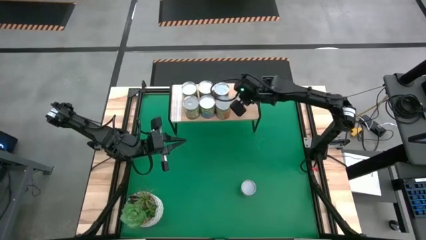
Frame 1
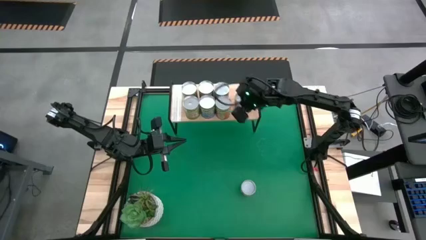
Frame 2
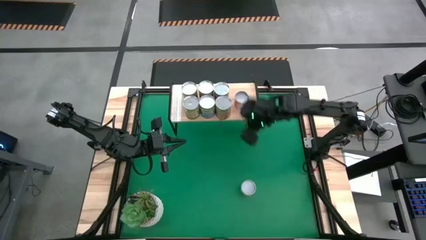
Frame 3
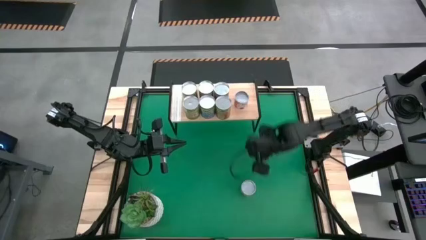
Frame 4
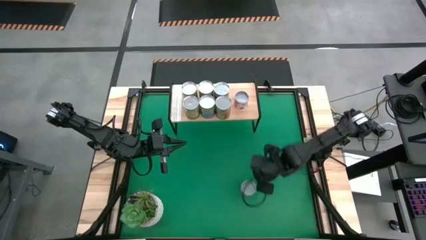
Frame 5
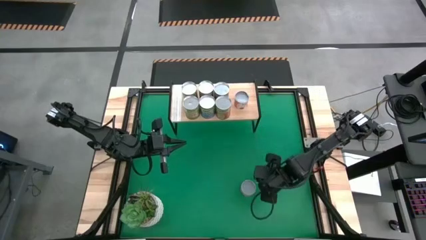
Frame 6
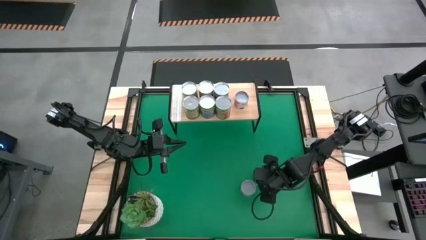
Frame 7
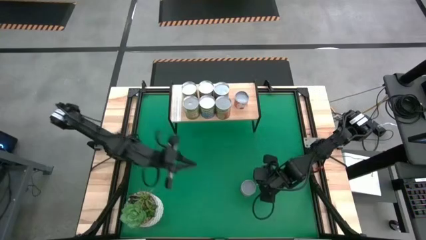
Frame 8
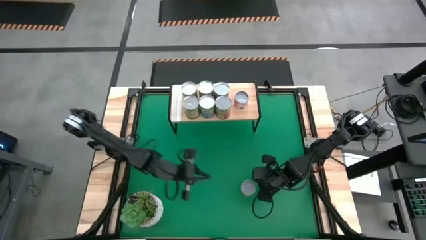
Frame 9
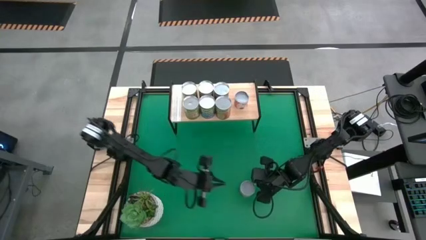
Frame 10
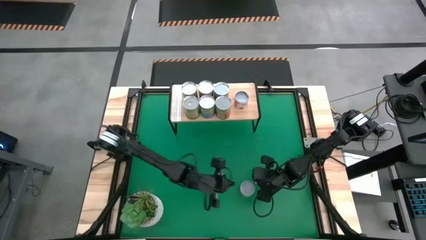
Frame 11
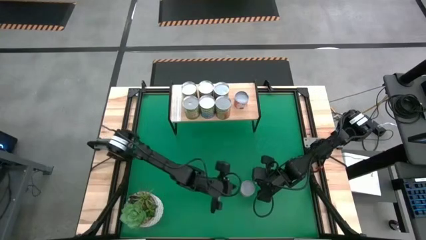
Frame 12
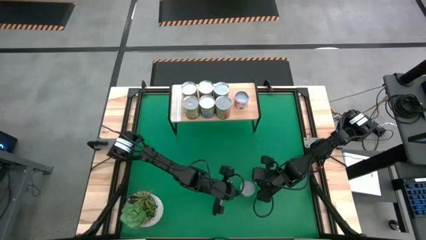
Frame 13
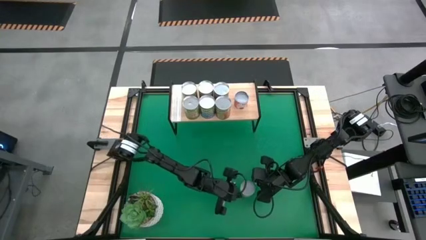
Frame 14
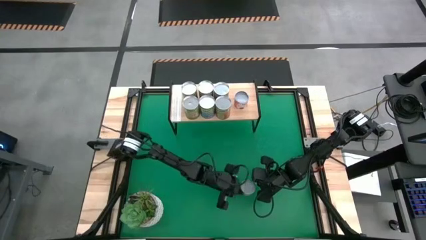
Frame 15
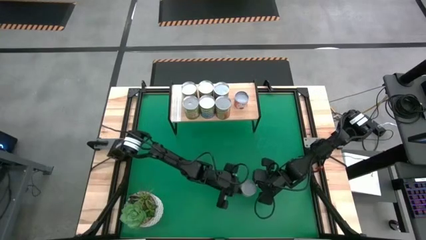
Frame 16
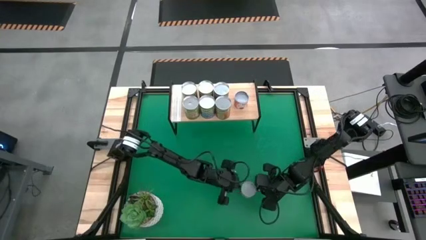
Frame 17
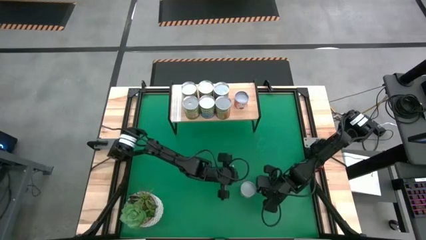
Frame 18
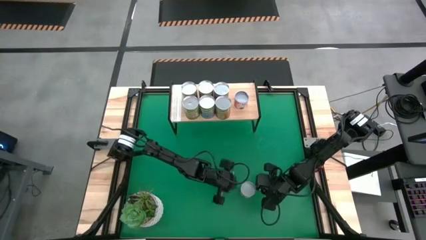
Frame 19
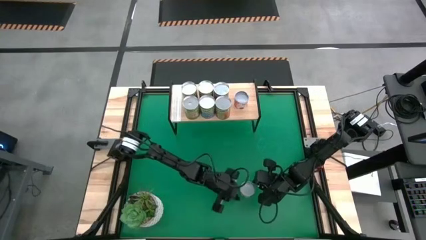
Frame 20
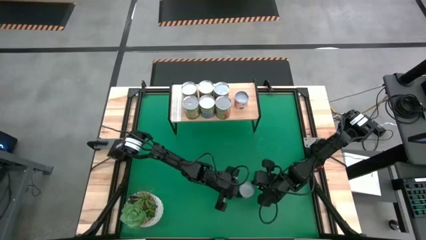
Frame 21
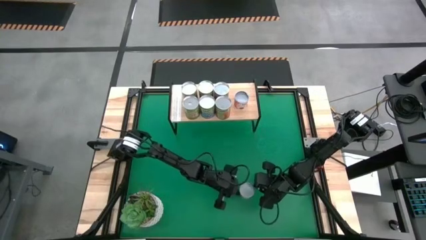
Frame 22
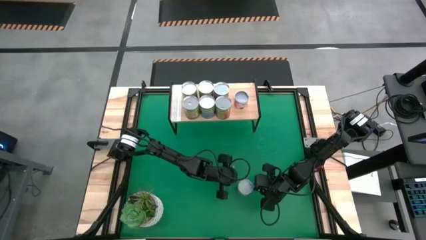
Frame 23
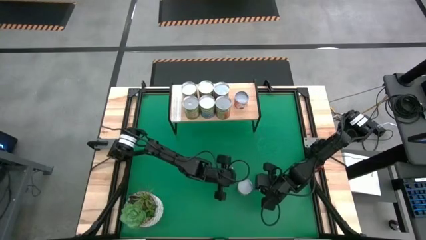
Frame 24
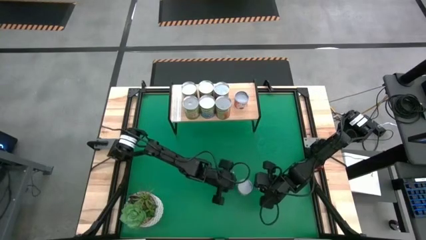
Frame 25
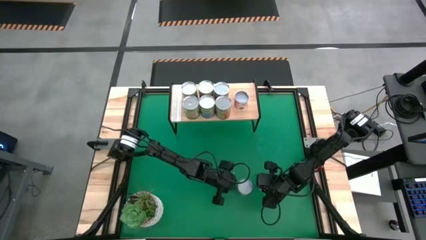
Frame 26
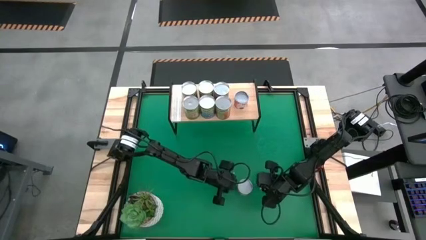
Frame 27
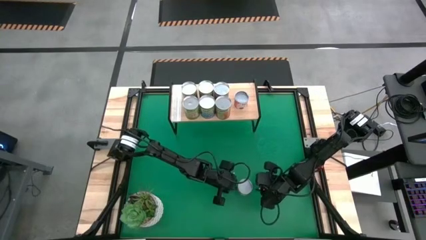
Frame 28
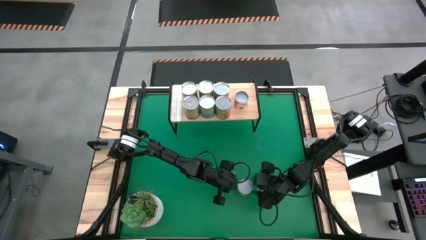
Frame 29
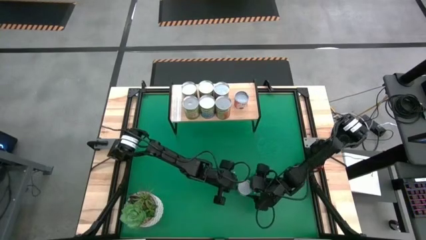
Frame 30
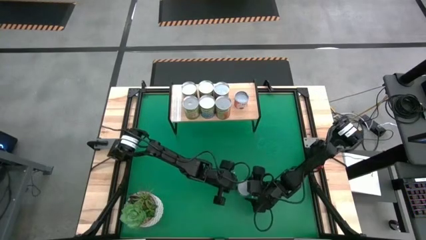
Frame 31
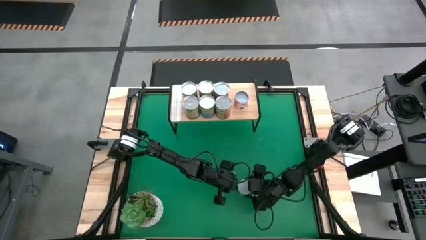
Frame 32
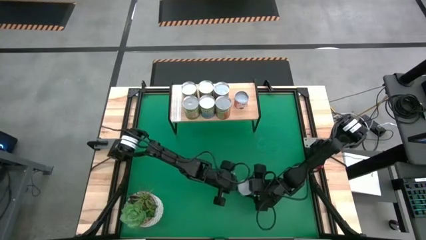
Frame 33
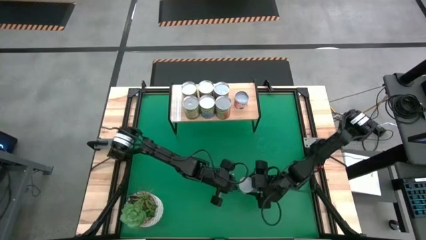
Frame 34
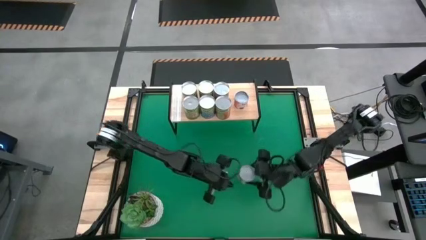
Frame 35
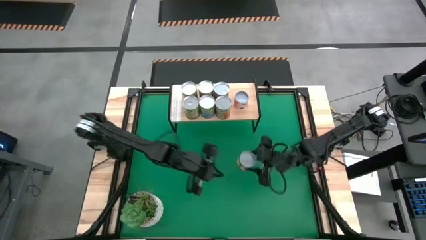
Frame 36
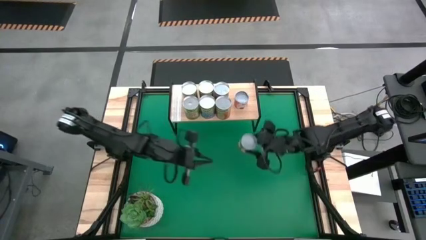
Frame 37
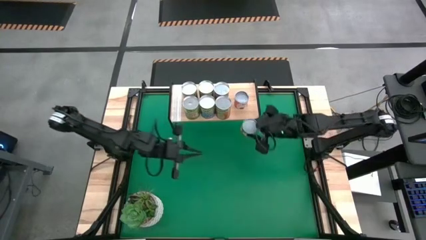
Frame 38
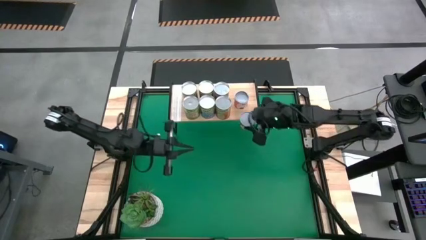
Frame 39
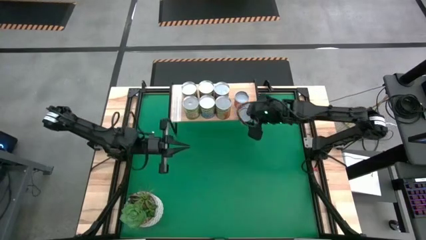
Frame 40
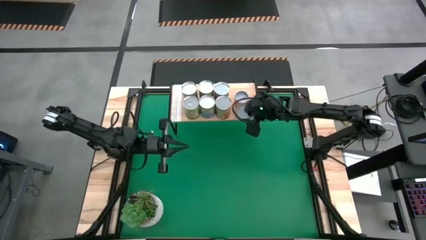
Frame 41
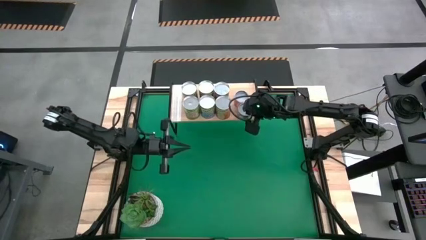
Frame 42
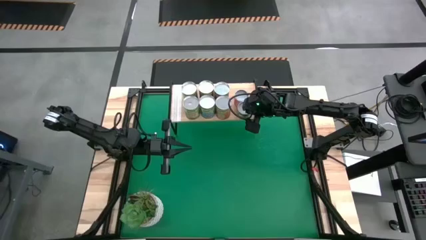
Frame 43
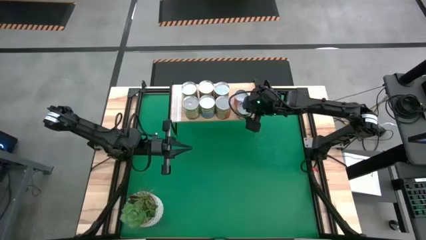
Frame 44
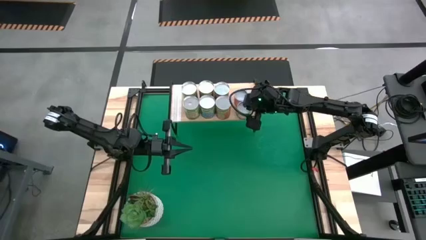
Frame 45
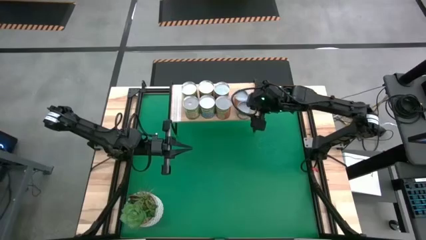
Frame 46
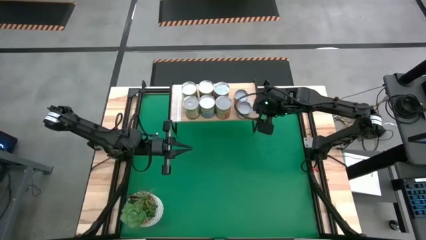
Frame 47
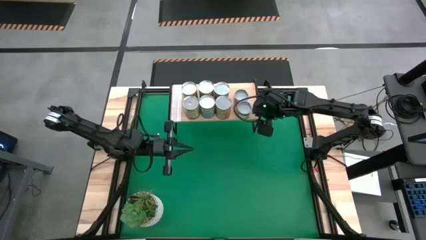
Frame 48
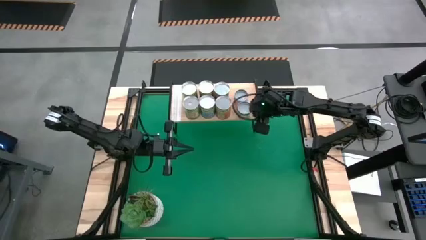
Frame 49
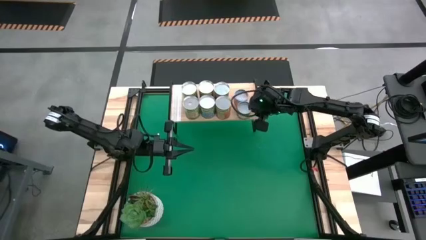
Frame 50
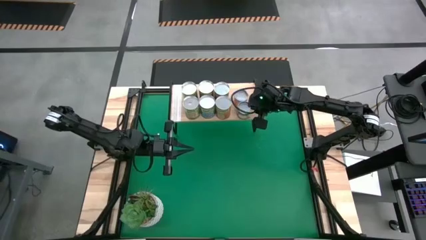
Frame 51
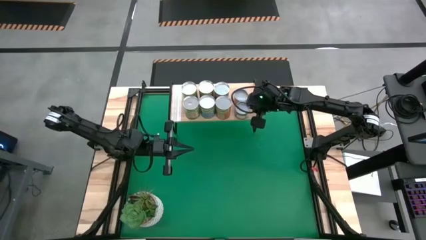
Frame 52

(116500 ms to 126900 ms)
Task: Pick and place cans onto a shelf
Put the canned sliced peaches on the shelf
